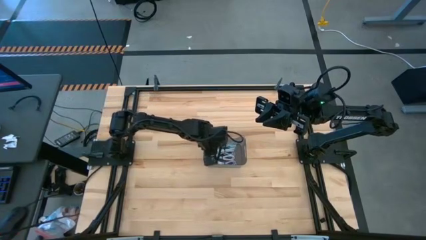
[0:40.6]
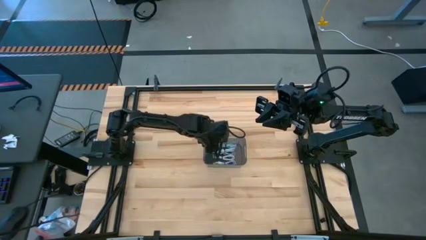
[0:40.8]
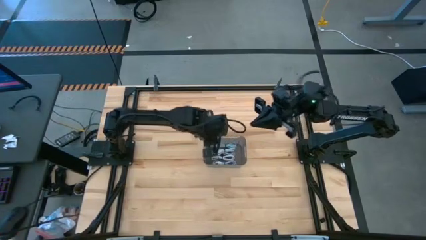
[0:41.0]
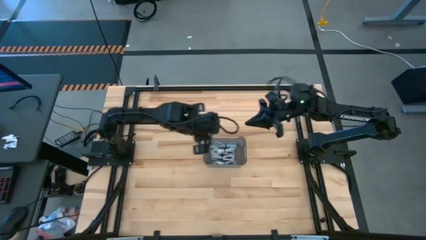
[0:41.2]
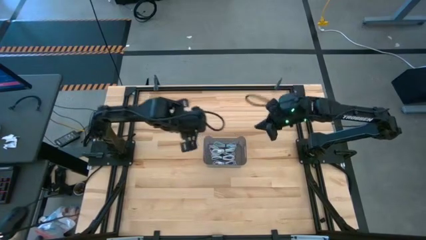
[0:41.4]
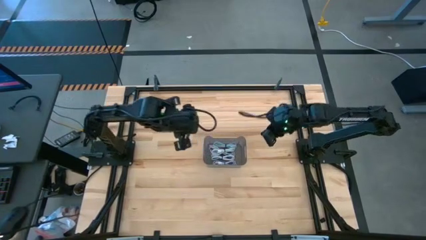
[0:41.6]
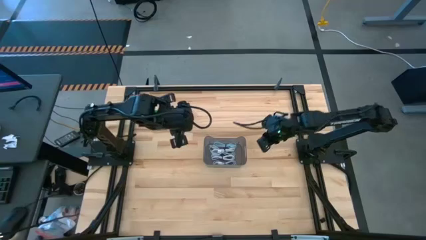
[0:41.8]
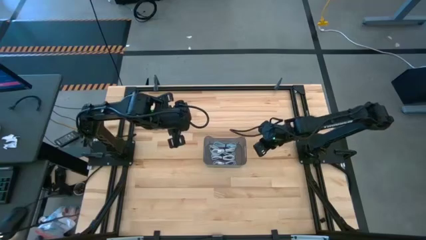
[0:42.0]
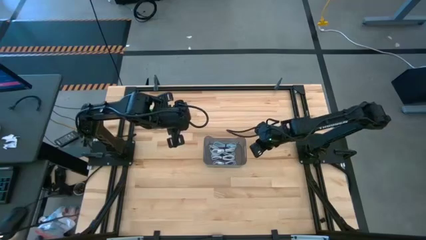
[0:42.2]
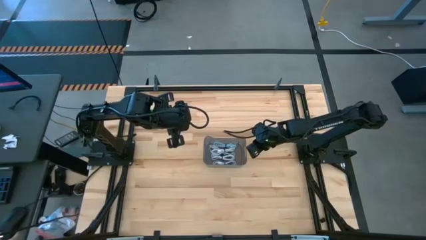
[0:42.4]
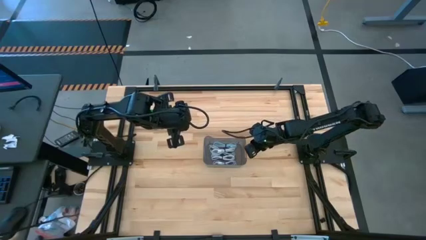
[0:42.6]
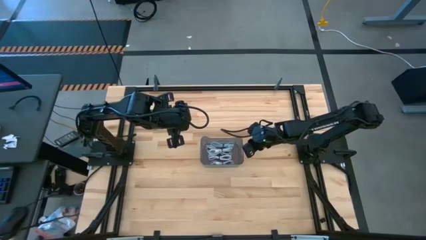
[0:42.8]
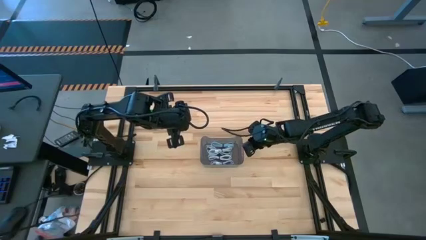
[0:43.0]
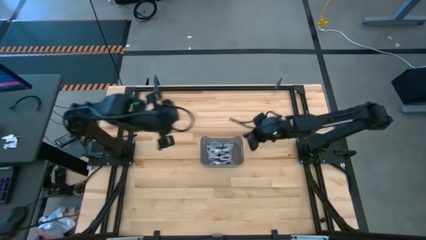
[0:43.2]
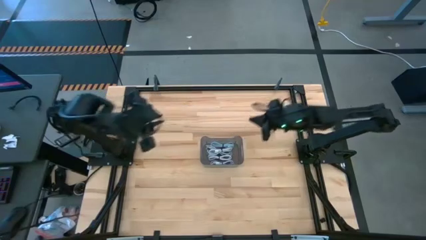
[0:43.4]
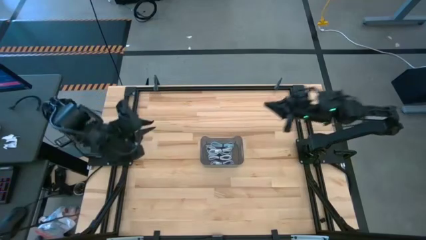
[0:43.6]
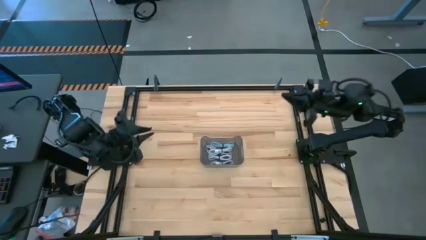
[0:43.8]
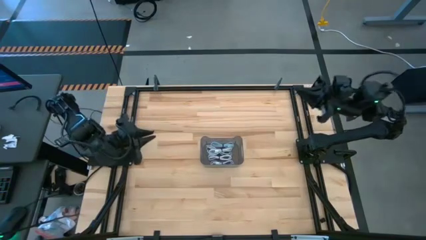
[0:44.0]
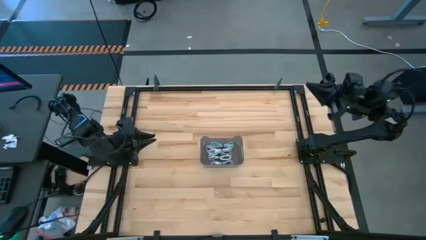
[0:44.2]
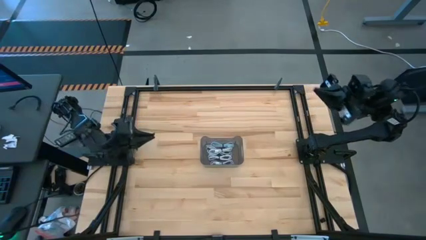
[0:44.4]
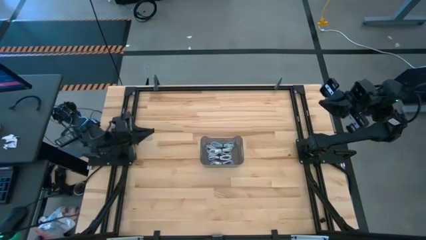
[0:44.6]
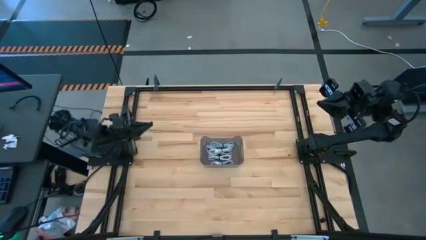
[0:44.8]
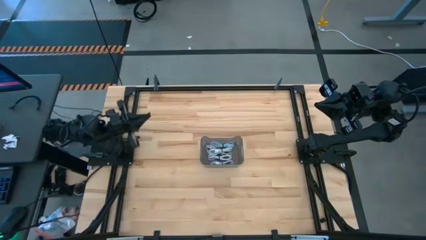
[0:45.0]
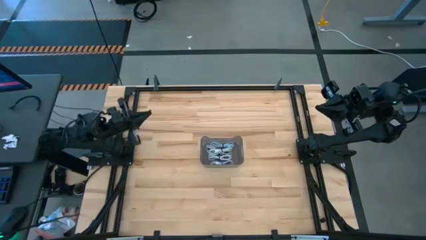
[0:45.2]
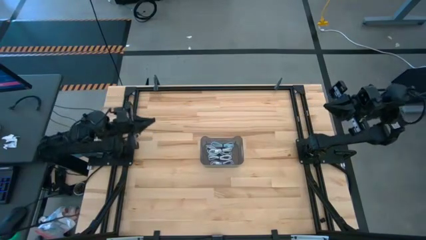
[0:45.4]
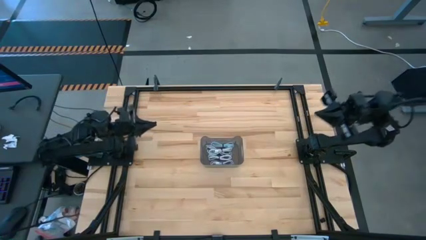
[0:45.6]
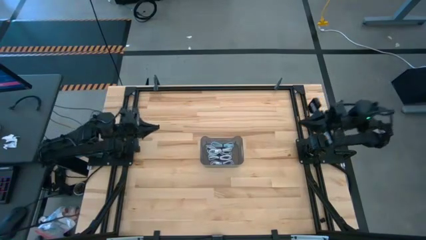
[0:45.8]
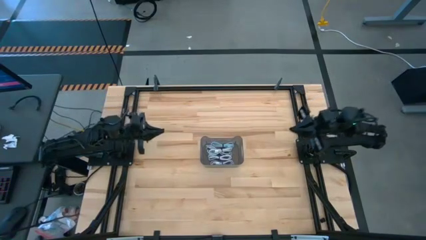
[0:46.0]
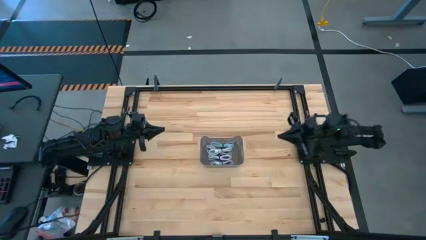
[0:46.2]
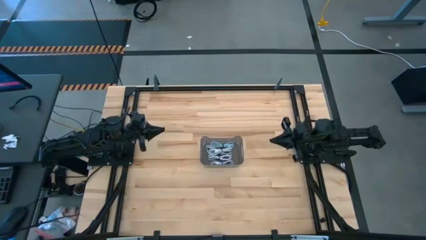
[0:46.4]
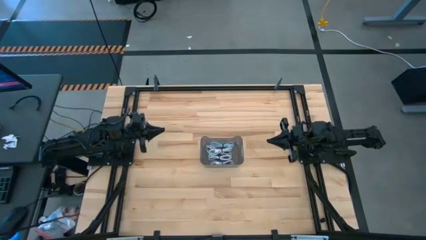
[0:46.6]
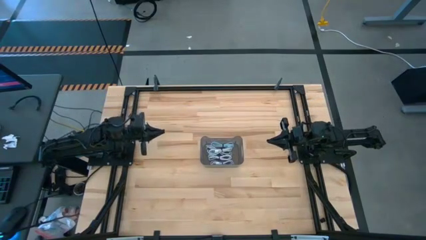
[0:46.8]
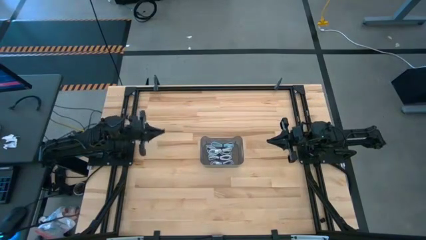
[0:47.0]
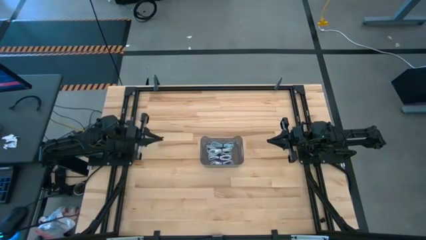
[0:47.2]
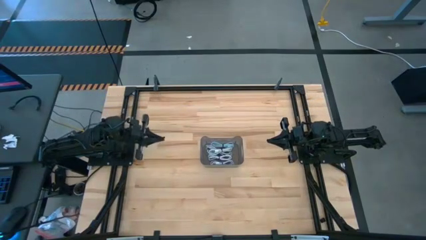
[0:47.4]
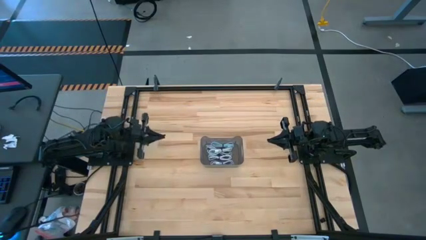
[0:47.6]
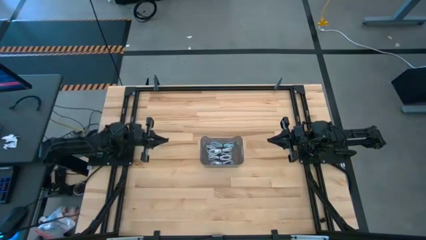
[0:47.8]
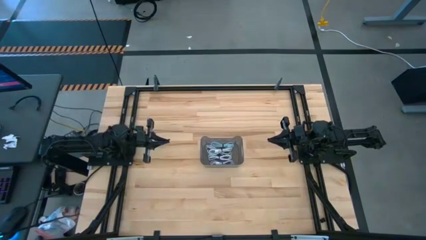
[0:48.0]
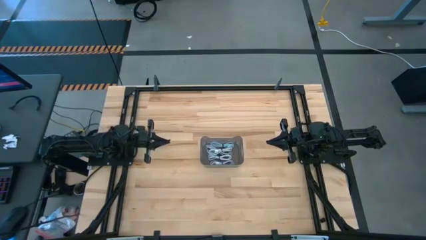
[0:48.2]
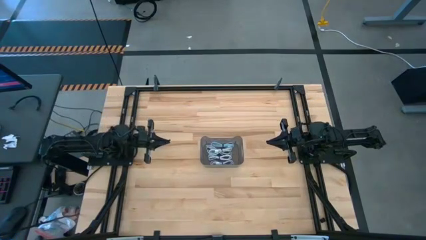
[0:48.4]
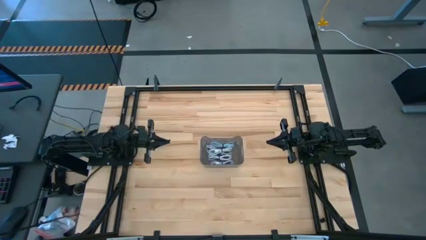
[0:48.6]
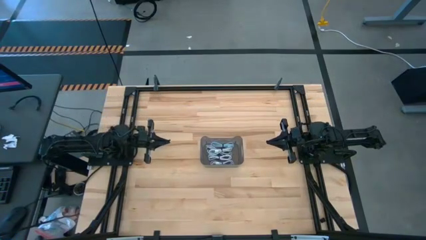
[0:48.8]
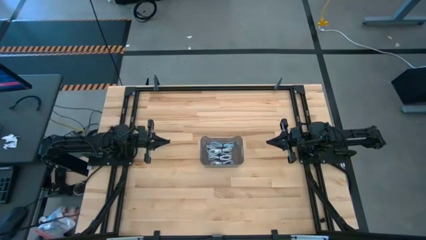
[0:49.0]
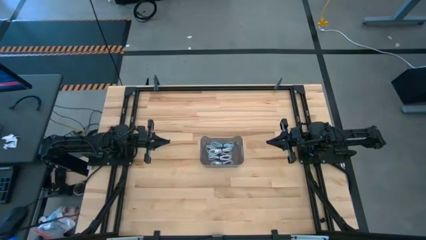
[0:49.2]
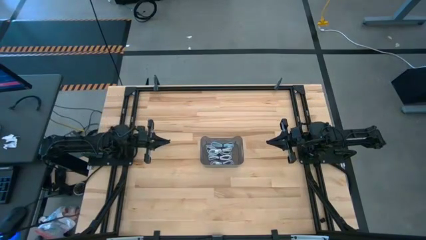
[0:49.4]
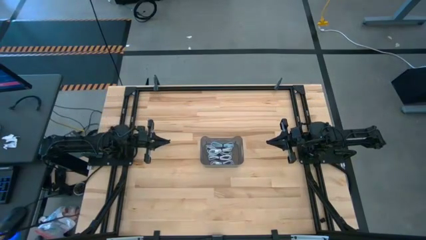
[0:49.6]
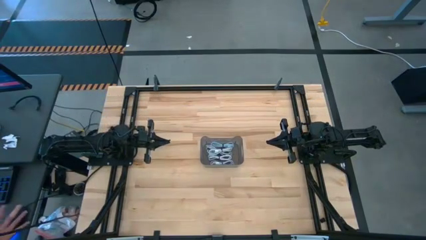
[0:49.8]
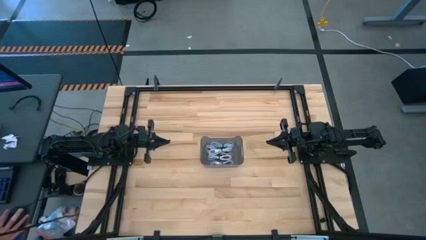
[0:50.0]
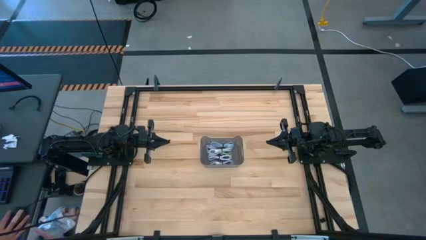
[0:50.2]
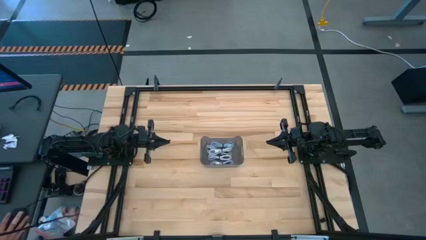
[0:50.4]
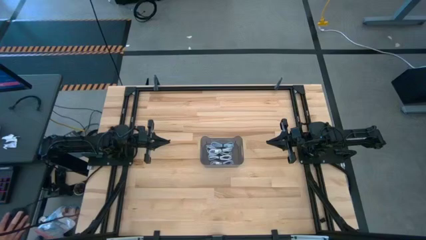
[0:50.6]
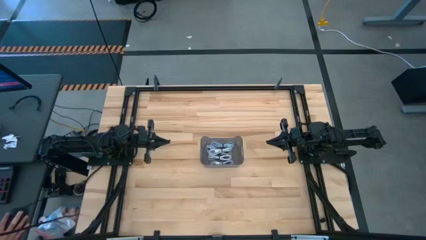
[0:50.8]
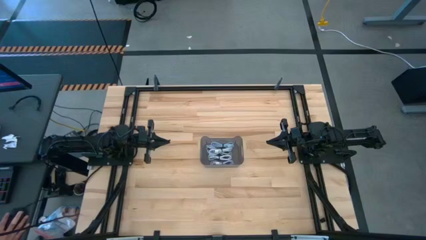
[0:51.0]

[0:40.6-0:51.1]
Task: Pick and place USB-C Cables
Return to Home Position

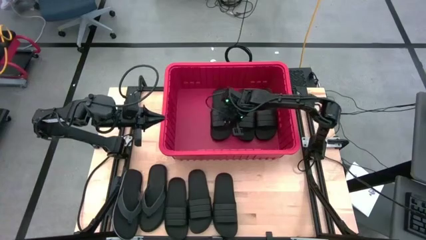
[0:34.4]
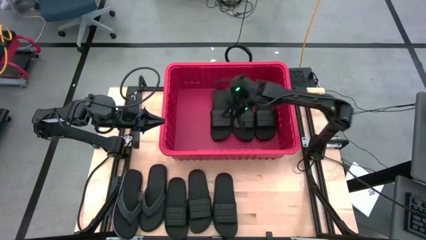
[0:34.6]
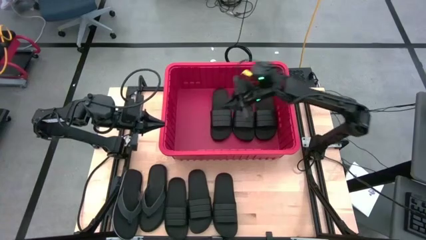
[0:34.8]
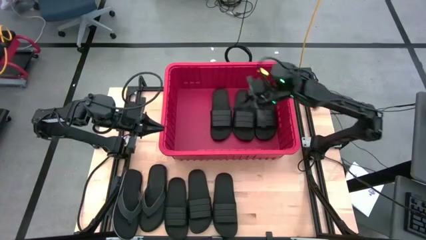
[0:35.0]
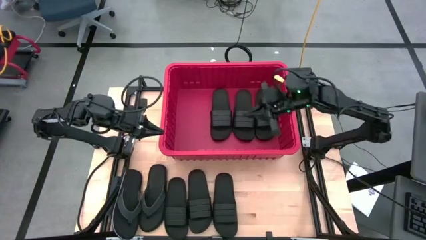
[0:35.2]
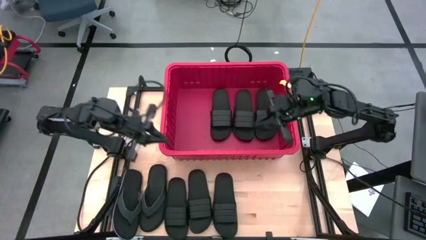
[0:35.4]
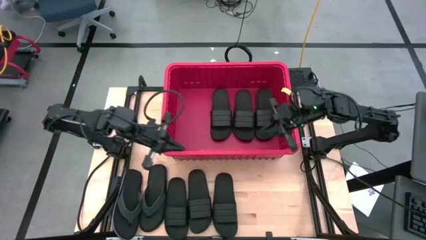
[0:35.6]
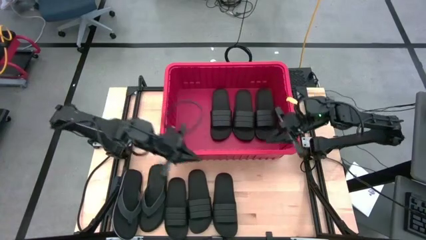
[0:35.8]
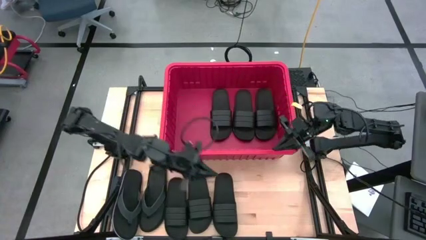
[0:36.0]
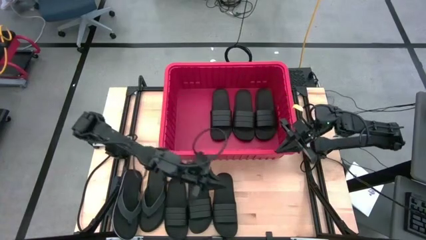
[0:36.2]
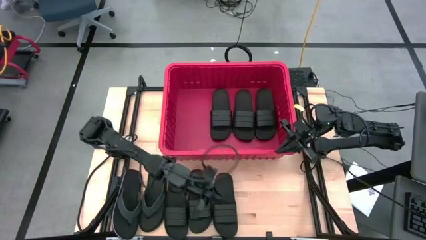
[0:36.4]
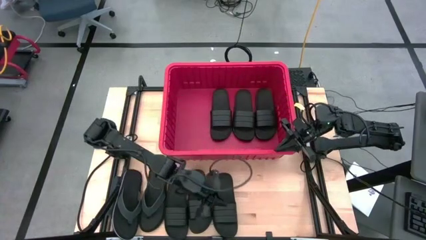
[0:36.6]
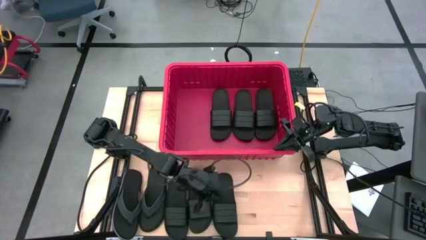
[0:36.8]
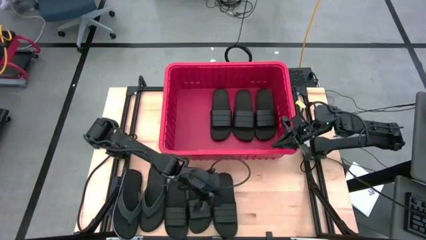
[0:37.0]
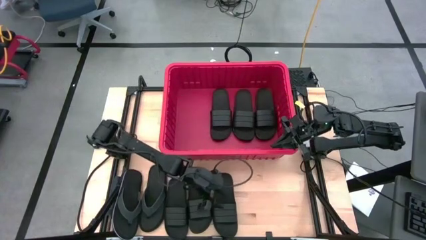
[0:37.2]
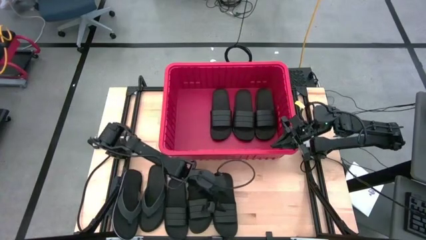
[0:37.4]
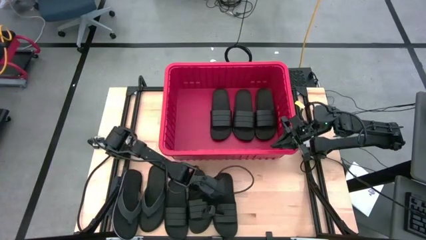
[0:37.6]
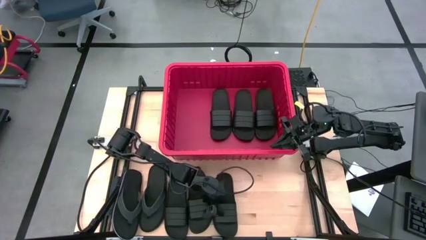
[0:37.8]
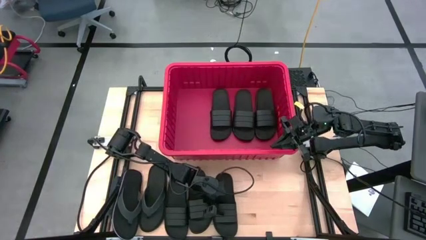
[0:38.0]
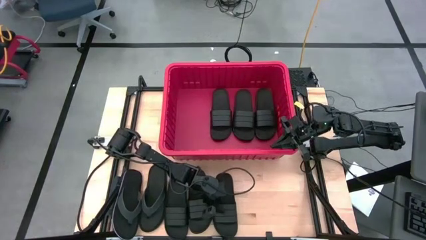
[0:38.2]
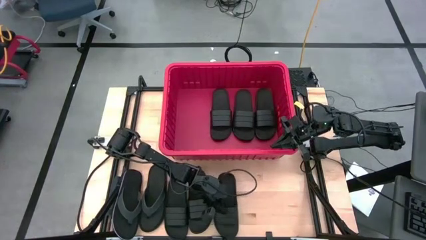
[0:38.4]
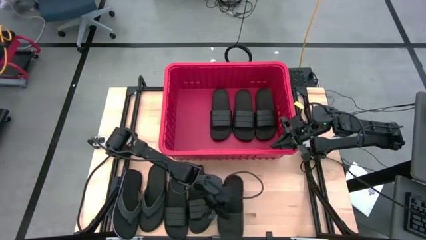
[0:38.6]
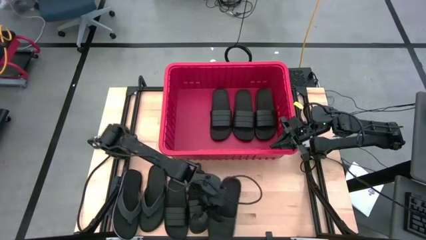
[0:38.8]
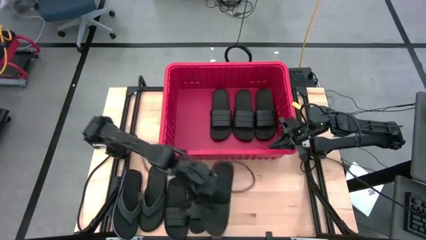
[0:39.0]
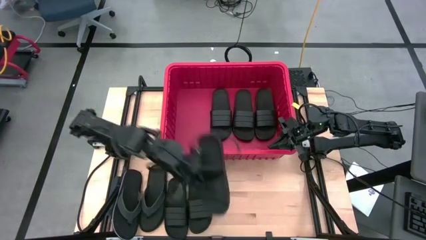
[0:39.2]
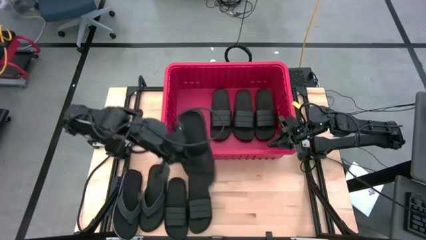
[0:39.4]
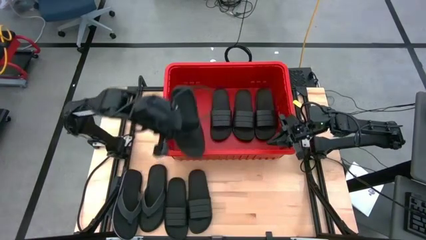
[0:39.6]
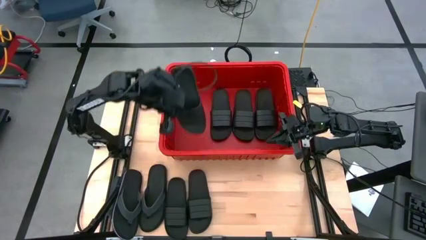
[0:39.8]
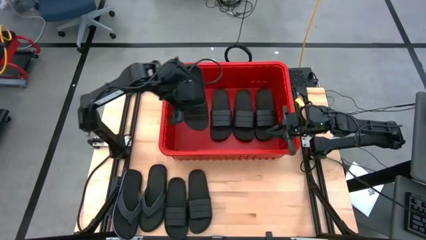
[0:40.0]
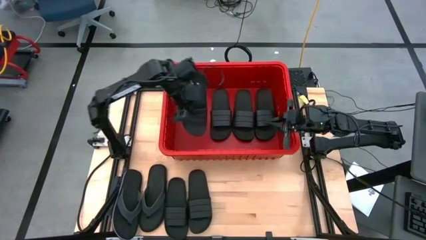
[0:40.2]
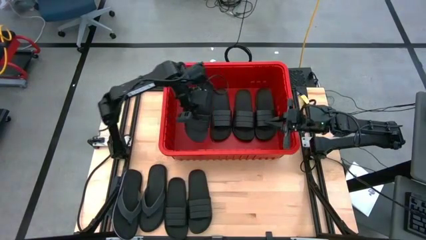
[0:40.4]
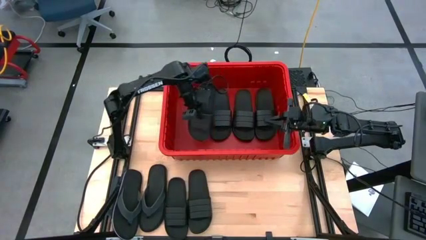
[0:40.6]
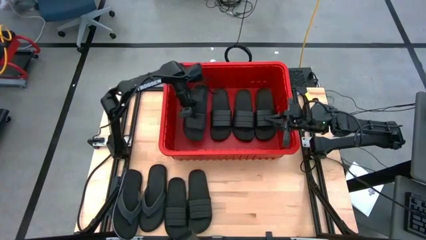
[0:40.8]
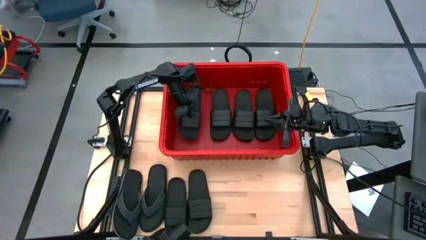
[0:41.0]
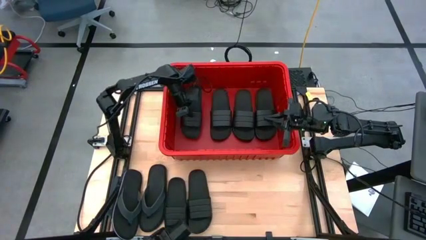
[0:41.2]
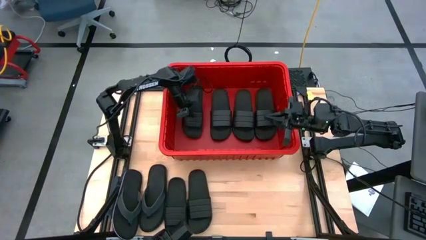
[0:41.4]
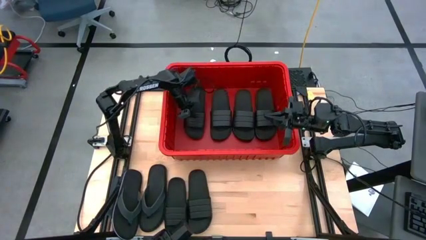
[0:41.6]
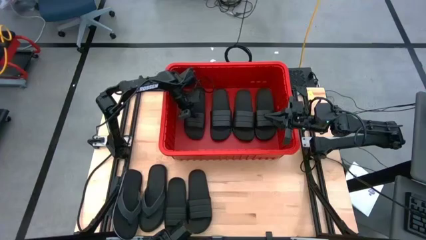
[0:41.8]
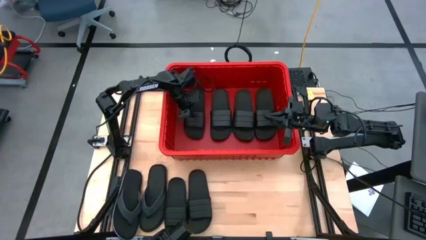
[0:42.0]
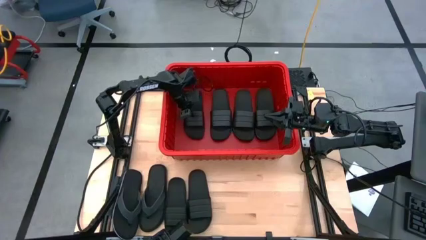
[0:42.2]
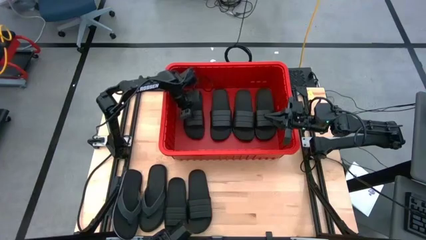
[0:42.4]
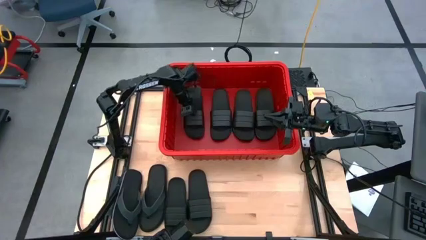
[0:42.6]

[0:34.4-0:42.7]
Task: Pick and place slides into bin
Put the black slide into the red bin
